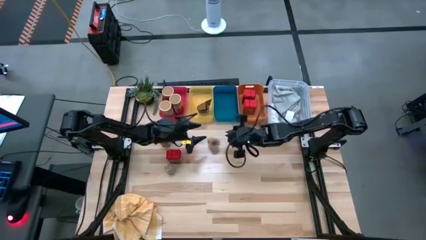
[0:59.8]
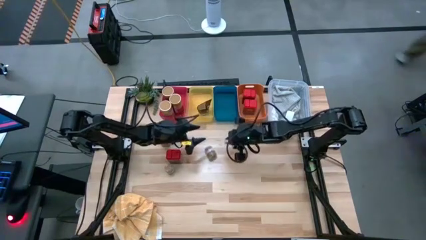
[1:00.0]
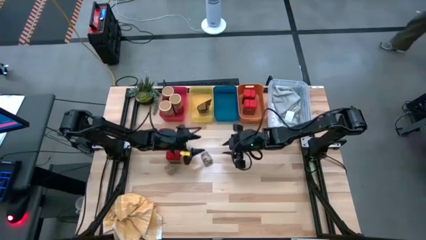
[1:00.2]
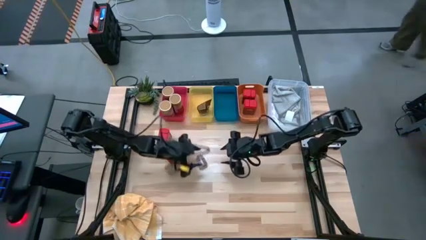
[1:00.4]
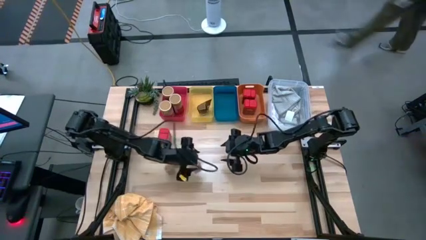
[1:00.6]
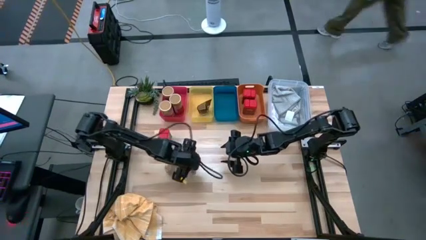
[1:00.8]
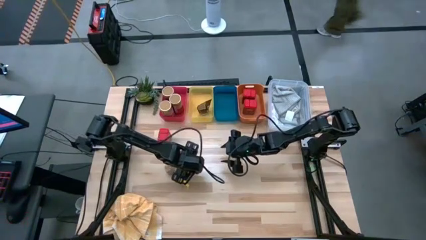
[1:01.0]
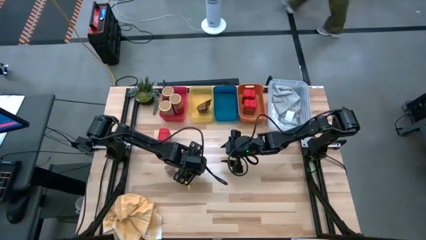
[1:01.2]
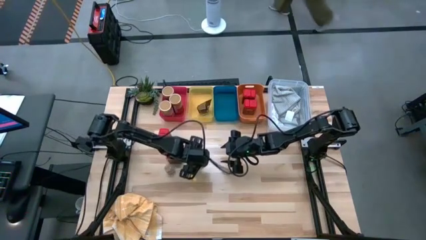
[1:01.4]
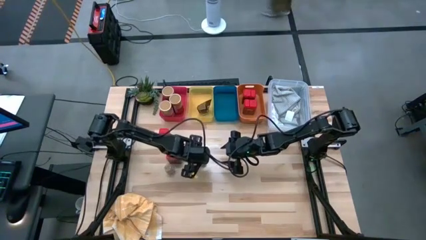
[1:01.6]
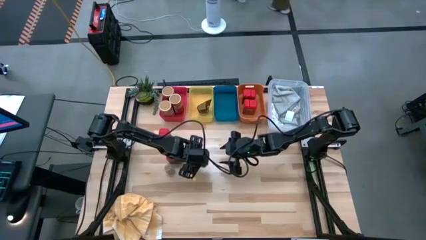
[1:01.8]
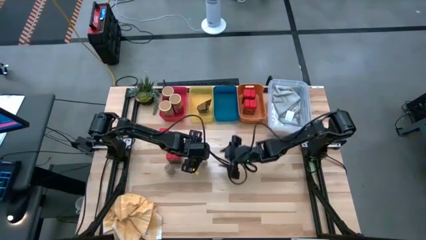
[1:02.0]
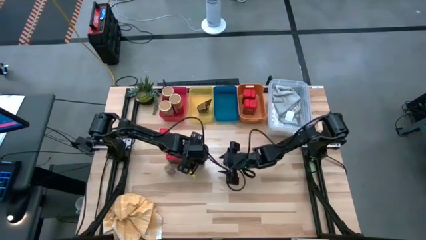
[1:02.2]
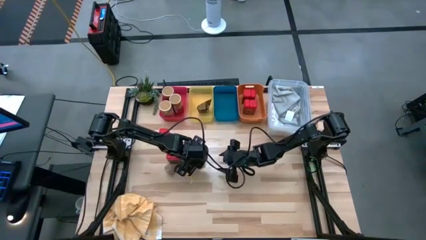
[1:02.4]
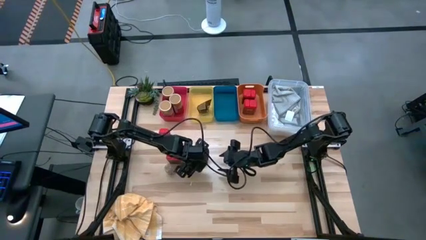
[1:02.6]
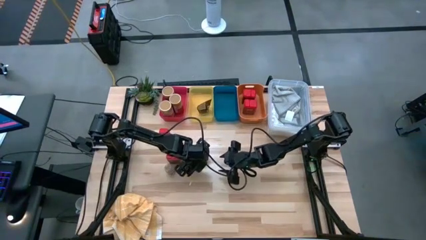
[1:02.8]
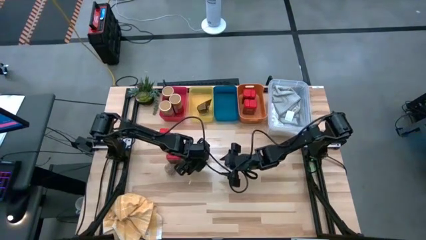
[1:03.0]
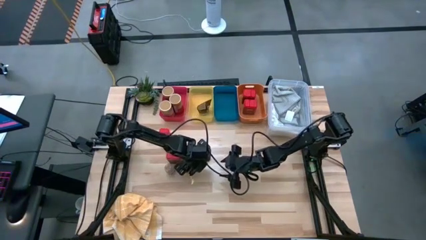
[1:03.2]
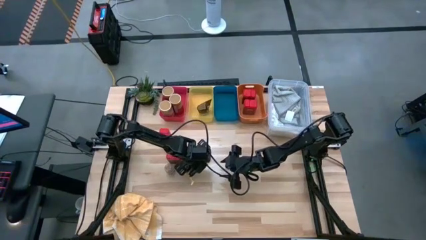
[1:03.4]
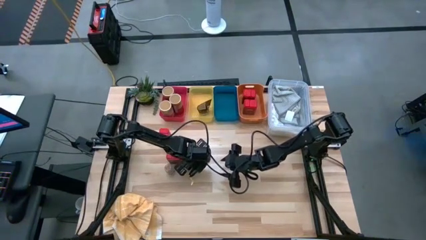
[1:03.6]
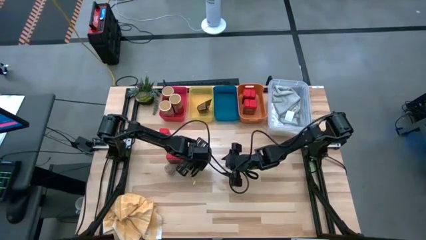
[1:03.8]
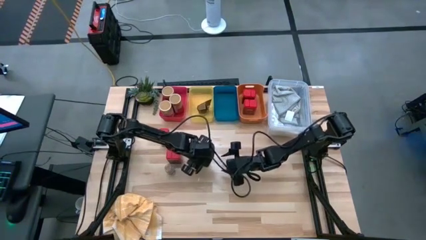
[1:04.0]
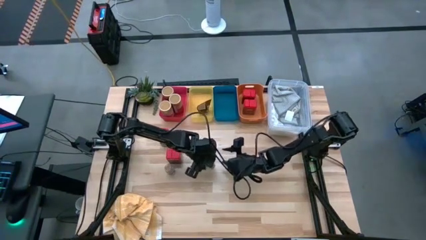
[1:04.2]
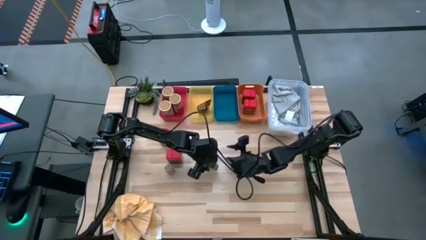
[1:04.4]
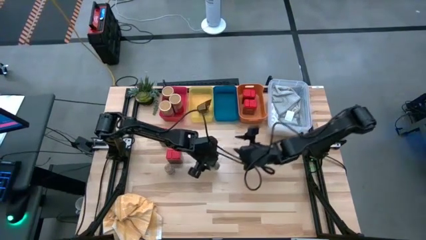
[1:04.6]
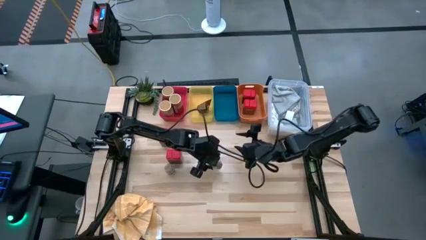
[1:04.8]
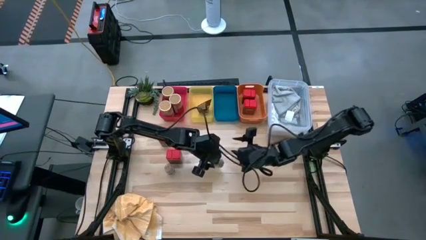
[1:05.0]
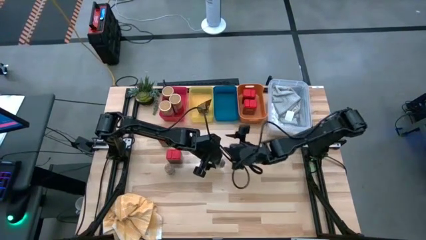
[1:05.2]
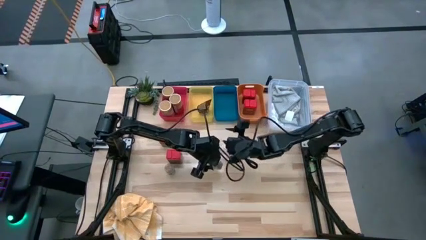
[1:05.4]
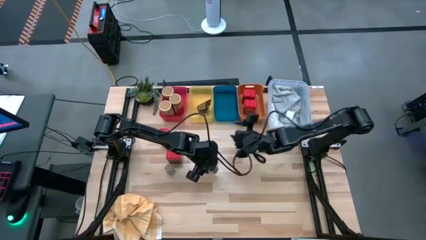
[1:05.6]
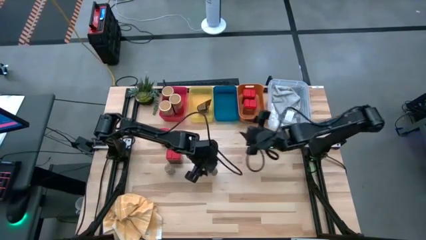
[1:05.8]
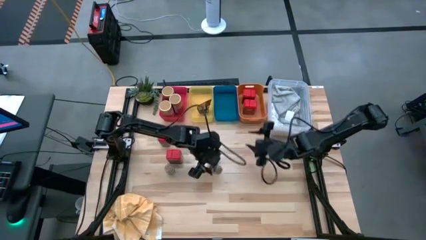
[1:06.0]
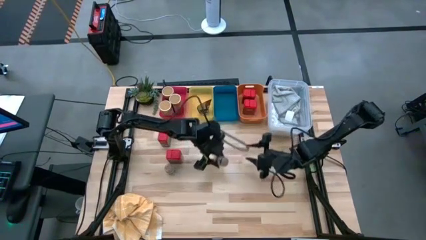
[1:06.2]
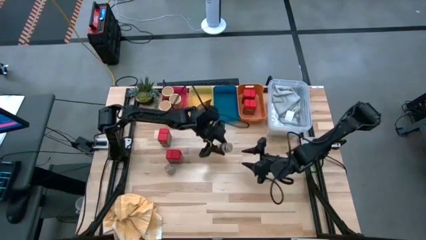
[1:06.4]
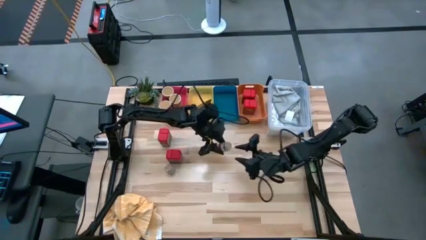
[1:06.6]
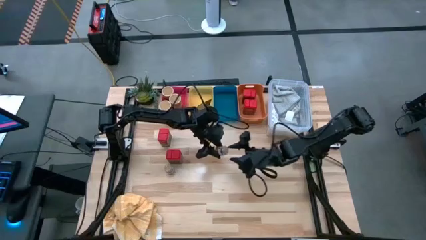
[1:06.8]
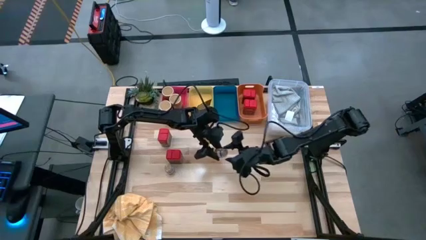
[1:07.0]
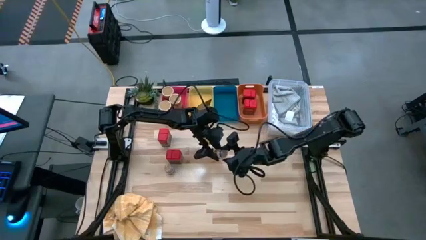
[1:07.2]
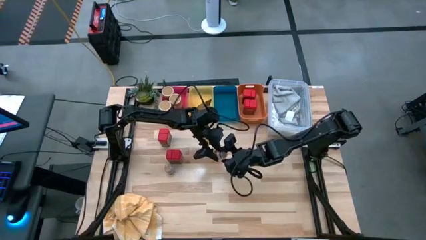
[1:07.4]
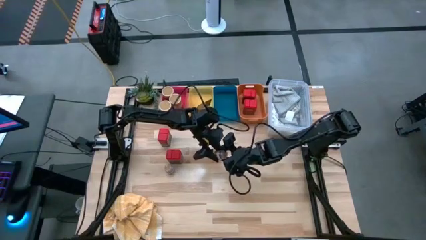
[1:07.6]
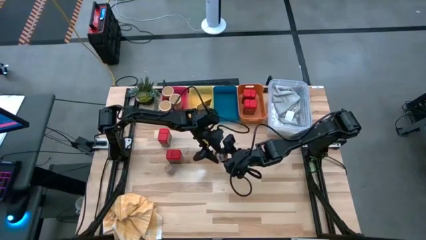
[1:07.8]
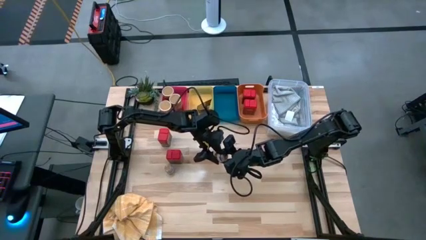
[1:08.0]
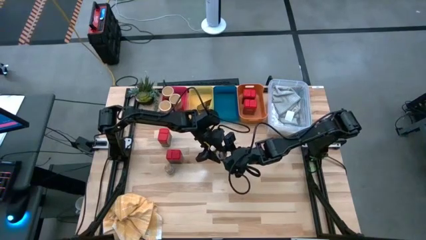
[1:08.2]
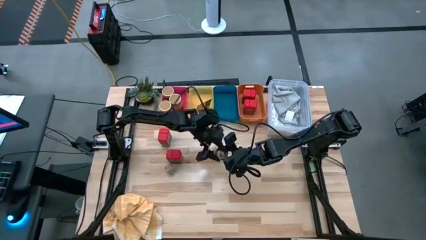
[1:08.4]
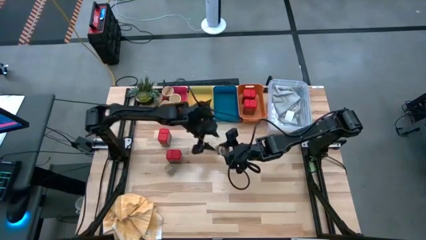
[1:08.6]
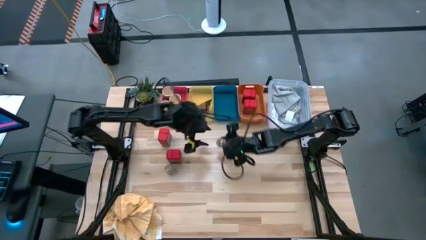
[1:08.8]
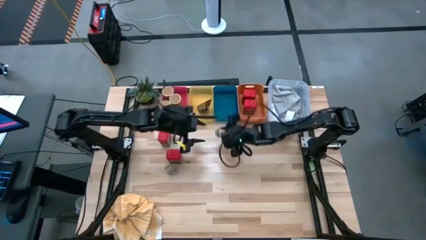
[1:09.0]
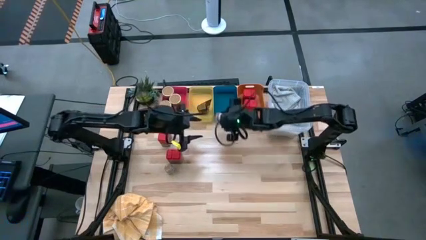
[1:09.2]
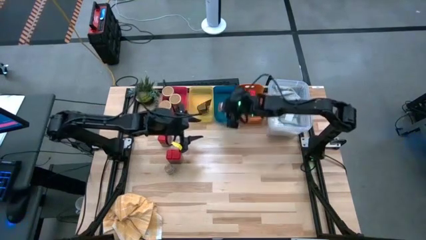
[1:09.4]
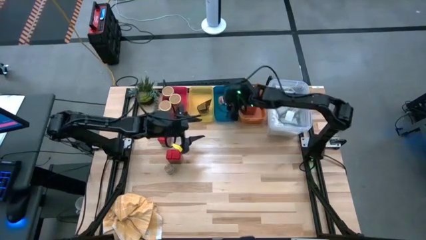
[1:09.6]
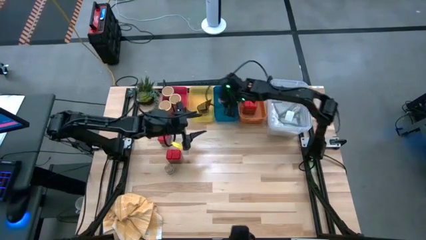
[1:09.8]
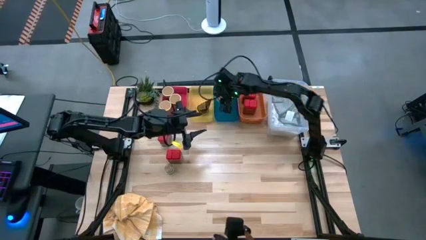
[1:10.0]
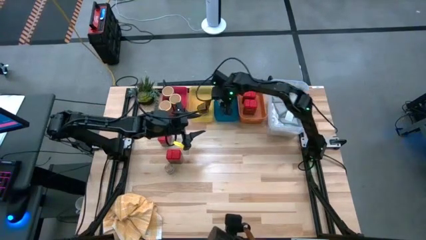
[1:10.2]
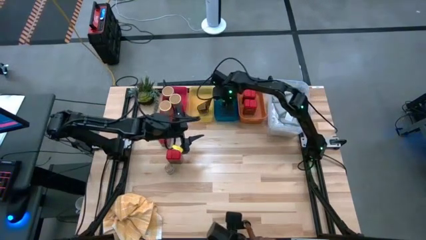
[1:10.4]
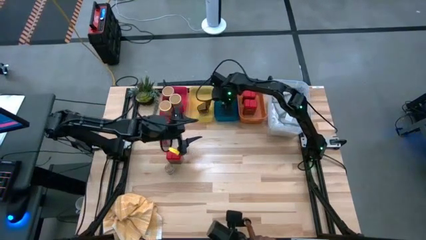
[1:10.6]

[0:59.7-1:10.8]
Task: Sort spices by type
Put the brown spice bottle into the blue bin

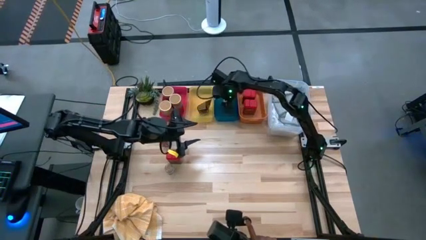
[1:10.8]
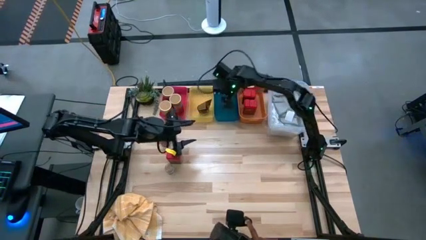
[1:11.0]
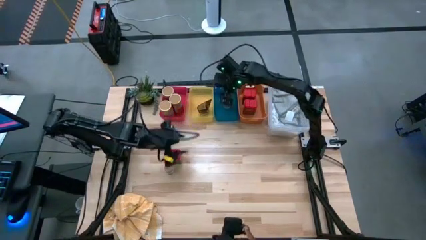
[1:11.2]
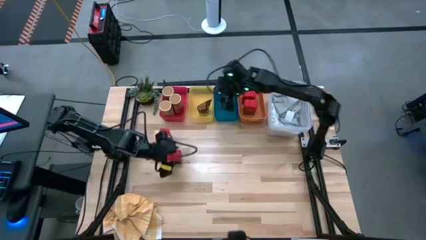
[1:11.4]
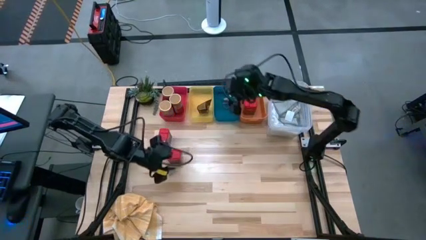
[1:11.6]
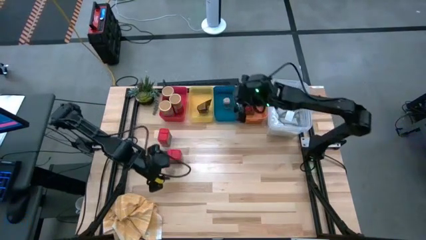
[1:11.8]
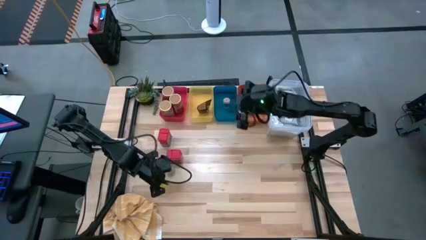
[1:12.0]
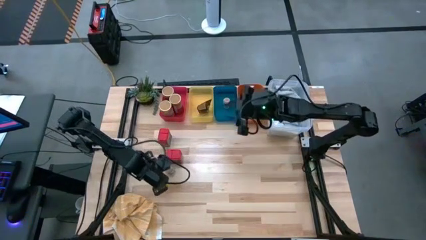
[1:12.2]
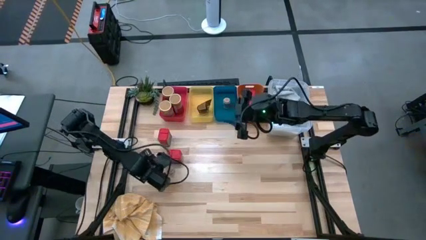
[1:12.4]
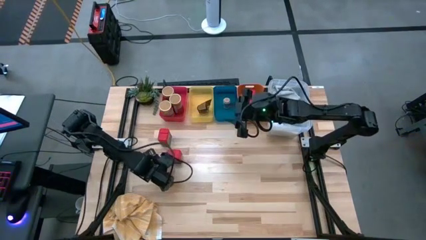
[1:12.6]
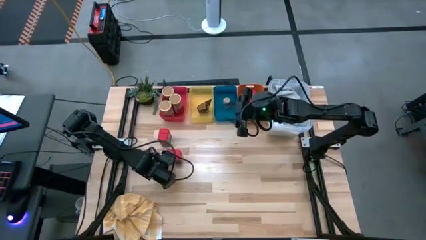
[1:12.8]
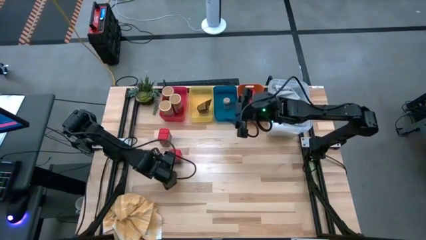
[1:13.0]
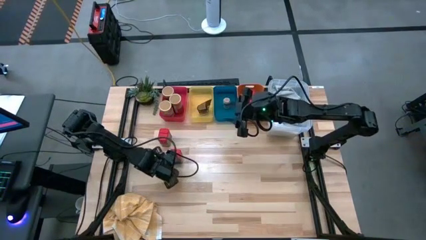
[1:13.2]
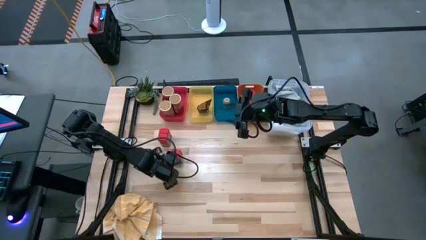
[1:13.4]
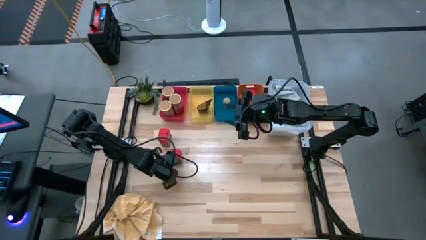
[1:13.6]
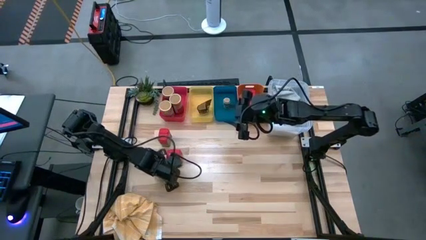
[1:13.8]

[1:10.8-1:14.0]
Put the brown spice bottle into the blue bin
